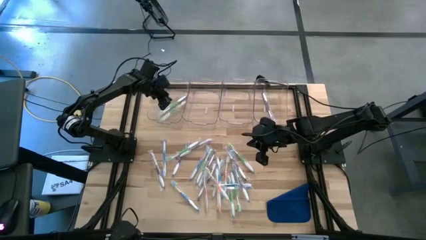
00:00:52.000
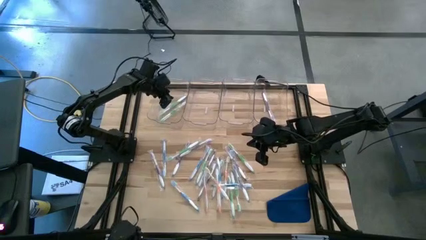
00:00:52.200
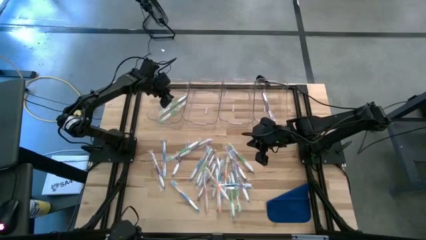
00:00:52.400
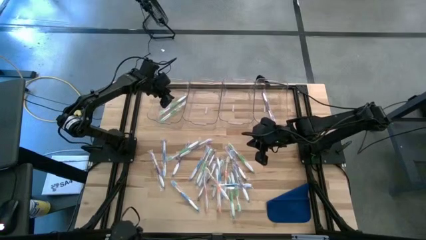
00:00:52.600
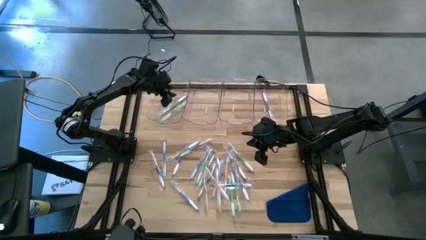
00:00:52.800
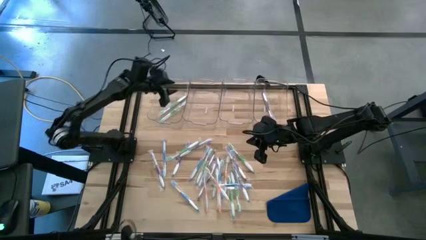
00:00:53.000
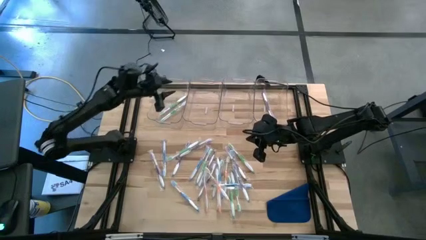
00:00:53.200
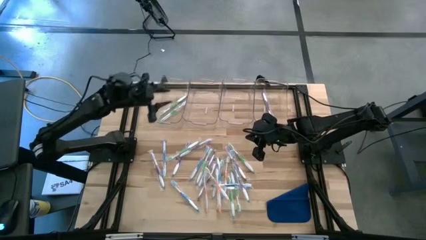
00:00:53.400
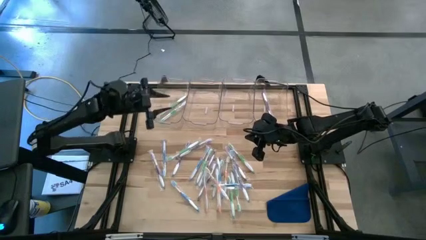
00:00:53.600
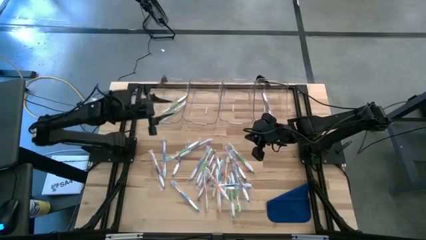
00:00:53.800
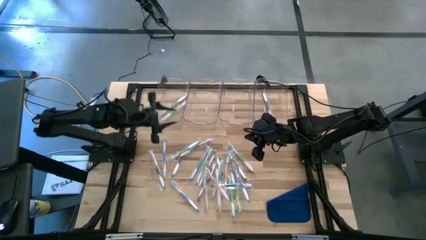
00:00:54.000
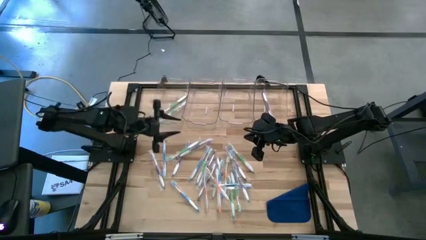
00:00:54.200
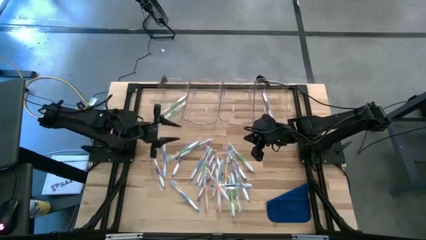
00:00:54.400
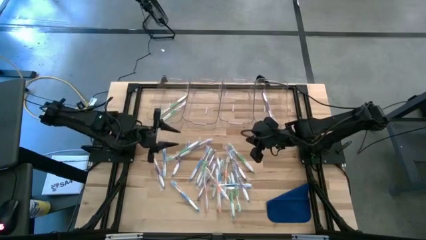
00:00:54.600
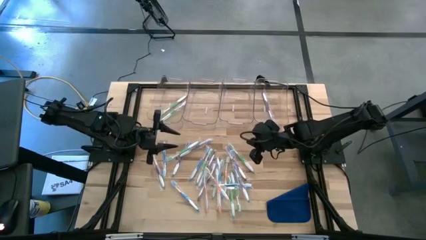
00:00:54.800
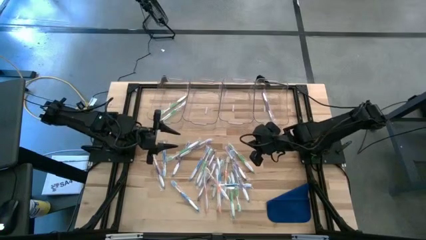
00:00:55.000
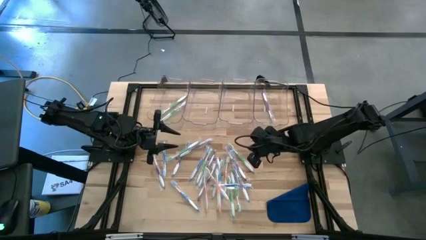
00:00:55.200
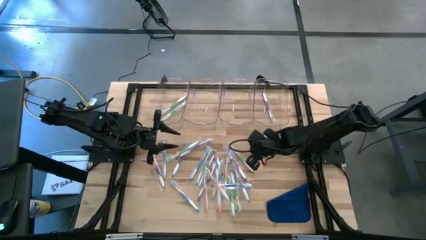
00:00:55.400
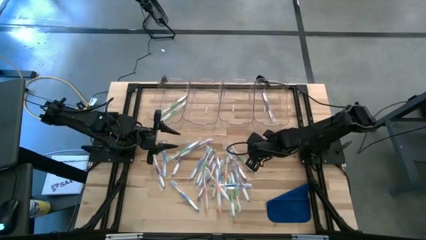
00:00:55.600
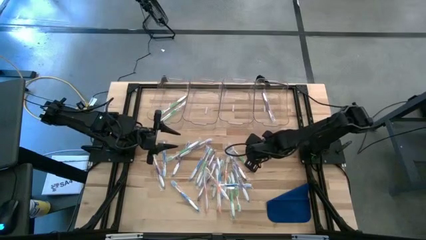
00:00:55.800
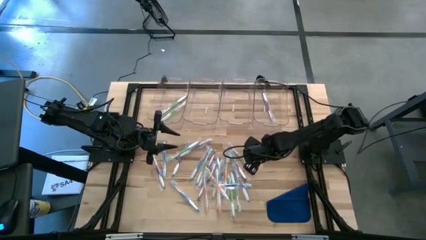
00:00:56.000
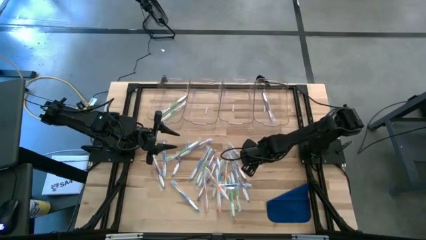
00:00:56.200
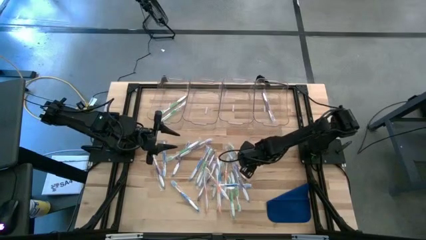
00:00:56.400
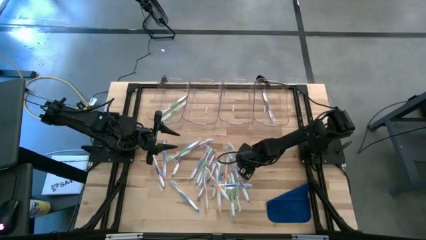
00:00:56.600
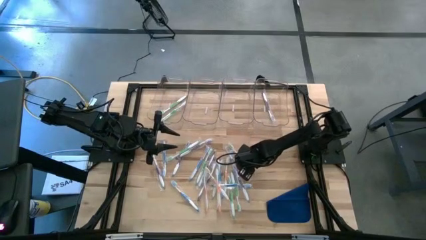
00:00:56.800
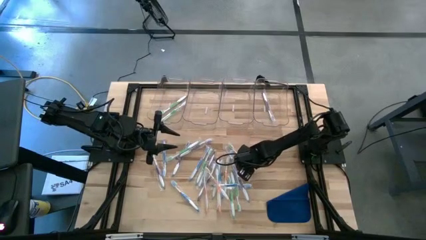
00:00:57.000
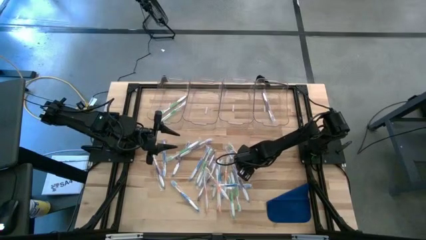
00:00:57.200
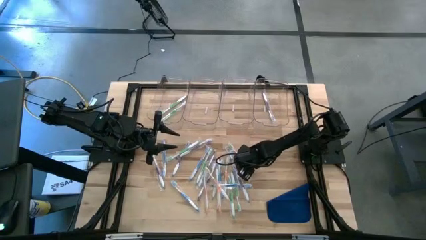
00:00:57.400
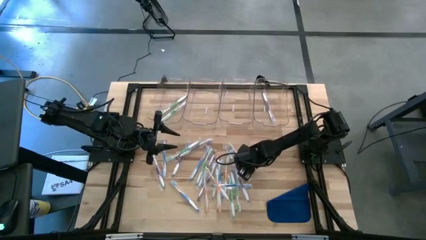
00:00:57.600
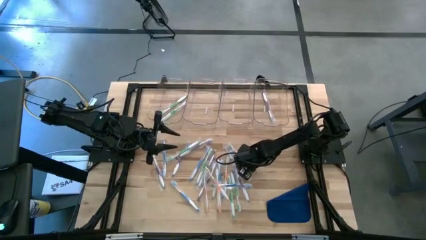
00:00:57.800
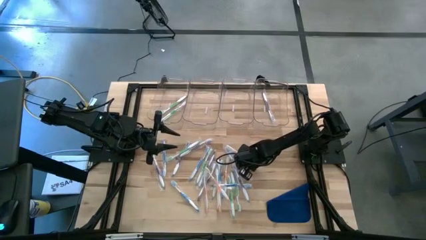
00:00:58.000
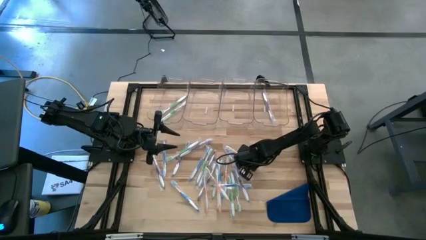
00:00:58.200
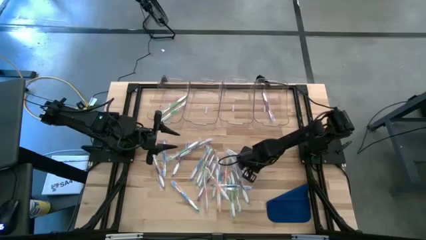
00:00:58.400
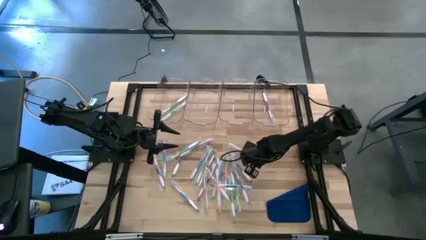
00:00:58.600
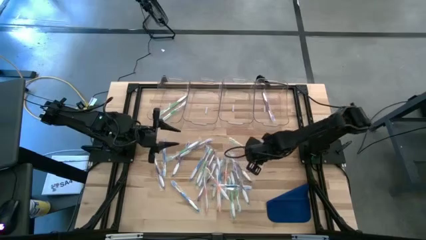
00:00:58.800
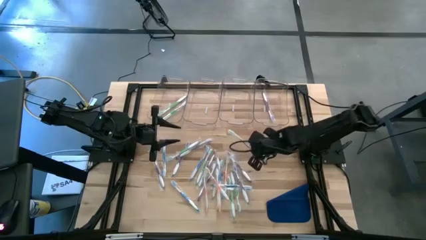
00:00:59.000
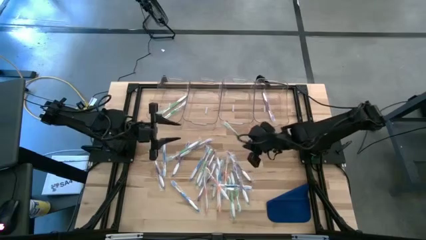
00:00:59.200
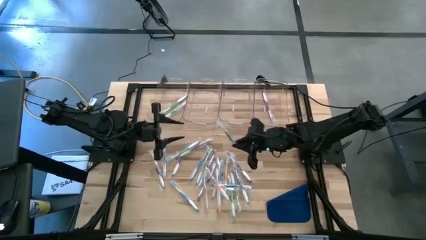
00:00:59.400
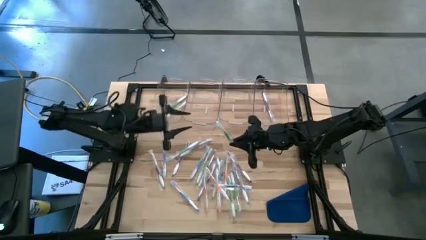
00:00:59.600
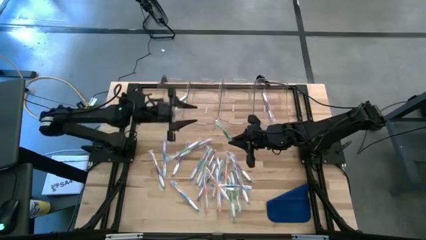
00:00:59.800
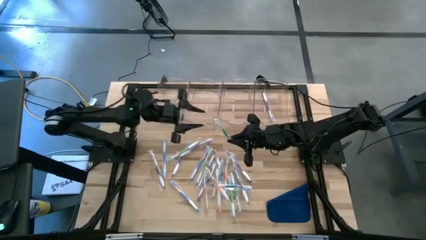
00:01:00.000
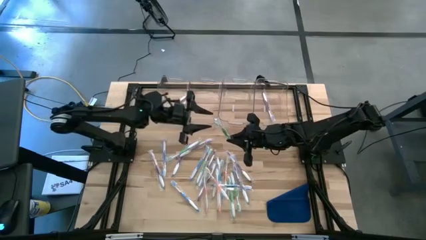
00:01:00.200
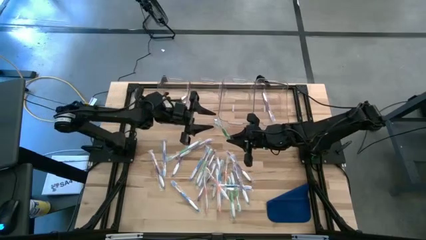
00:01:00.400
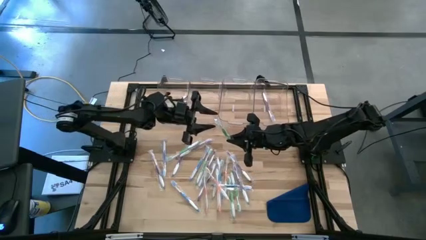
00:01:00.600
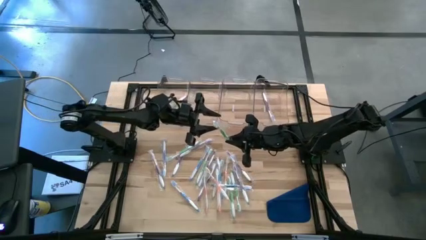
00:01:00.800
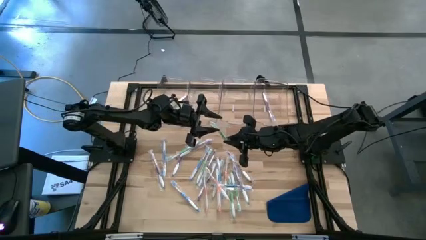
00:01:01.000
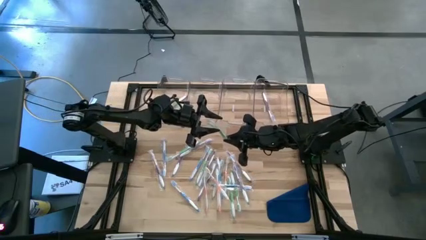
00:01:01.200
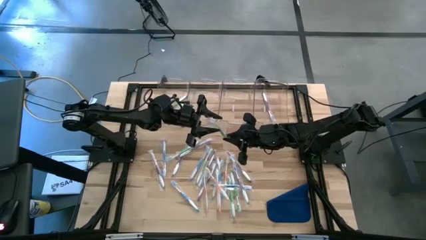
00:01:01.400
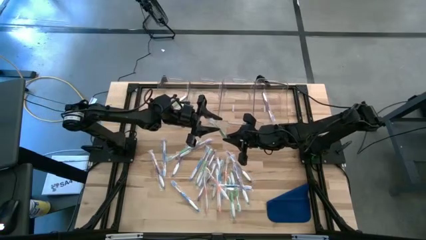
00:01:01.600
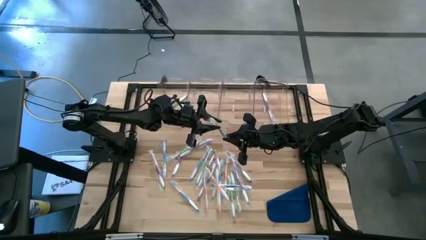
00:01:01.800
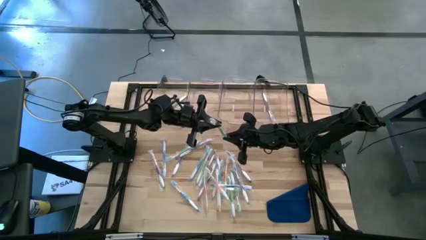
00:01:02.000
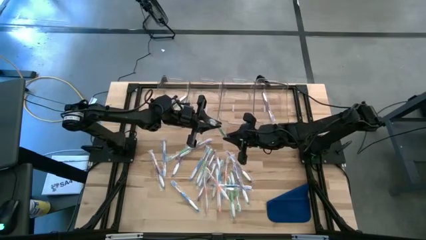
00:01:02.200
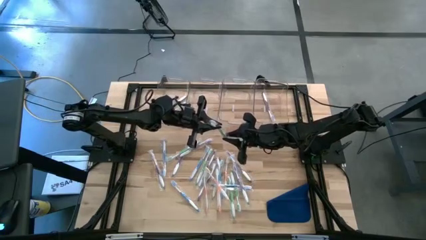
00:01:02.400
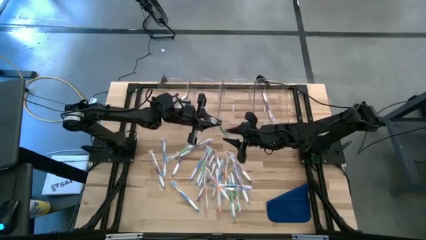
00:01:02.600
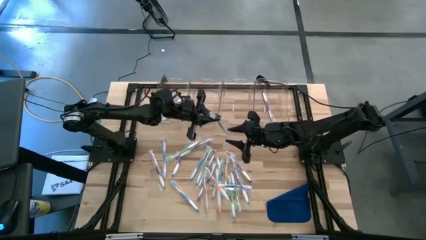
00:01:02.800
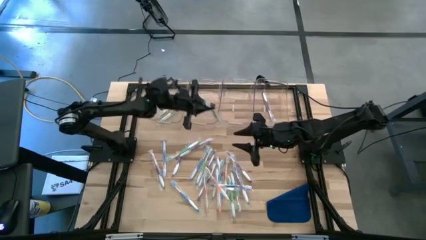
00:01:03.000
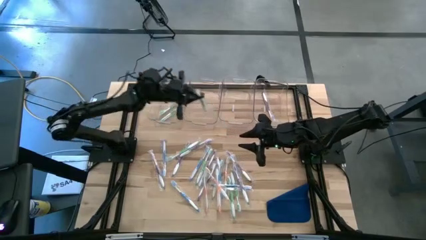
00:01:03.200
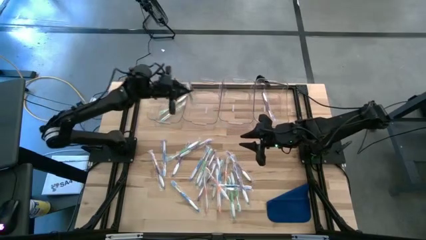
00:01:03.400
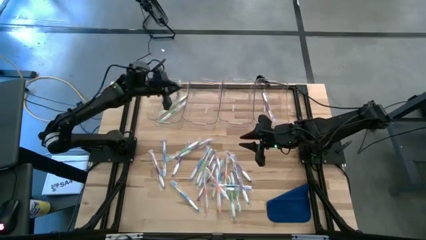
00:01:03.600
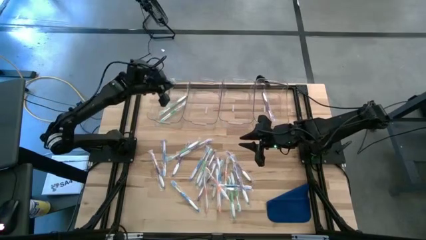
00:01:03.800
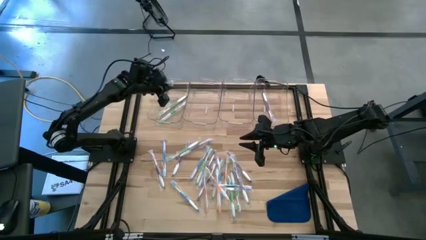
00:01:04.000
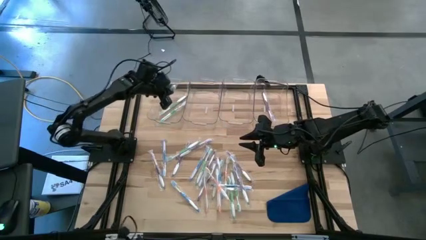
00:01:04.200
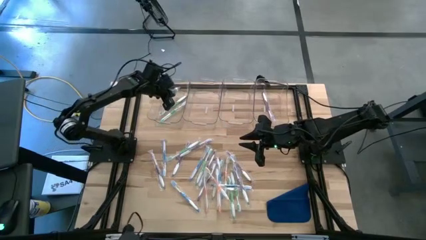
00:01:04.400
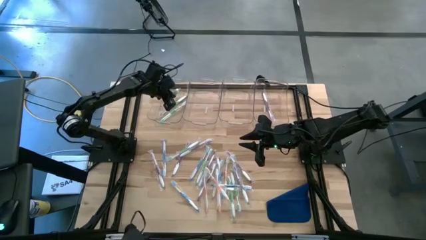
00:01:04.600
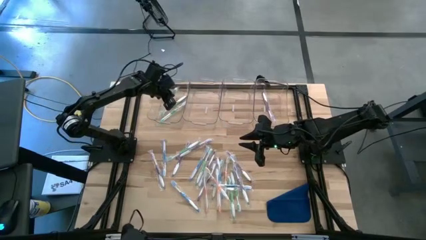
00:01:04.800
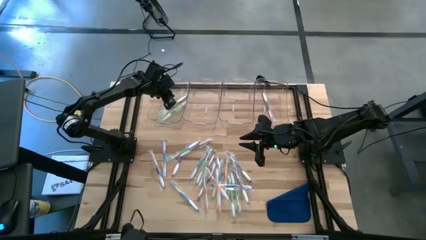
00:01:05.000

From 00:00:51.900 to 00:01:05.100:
Task: Pick & Place Toothbrushes
Put the green toothbrush into the left transparent bin

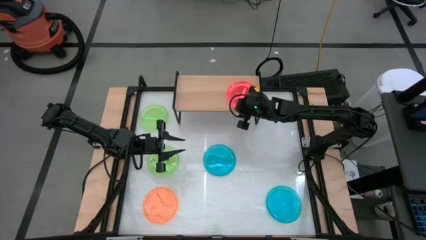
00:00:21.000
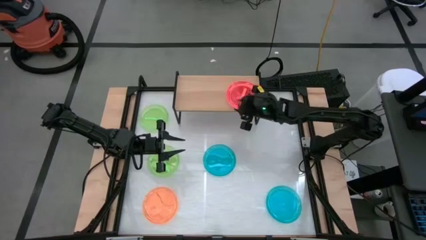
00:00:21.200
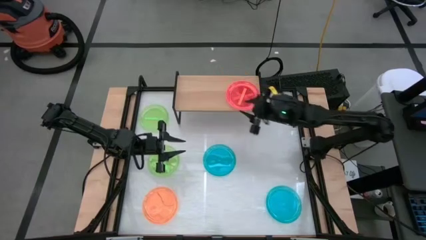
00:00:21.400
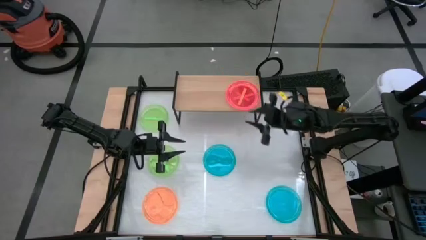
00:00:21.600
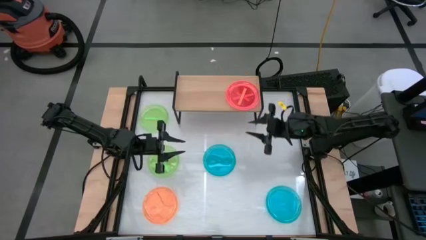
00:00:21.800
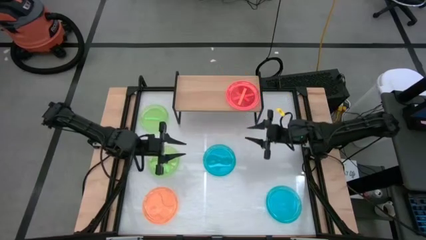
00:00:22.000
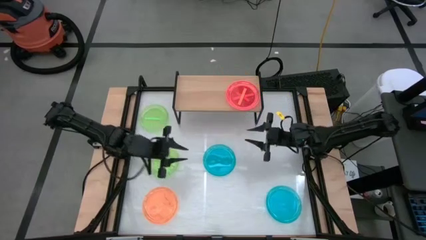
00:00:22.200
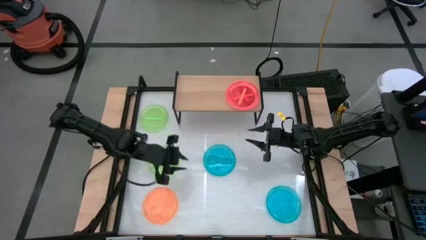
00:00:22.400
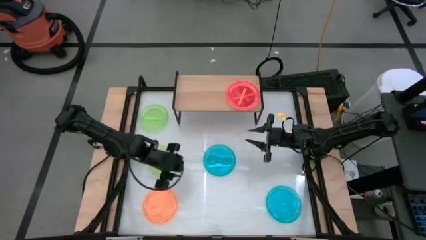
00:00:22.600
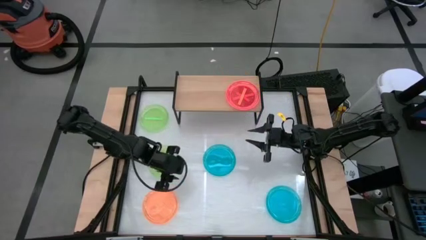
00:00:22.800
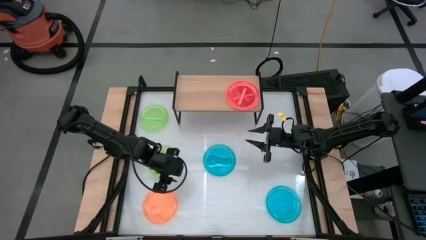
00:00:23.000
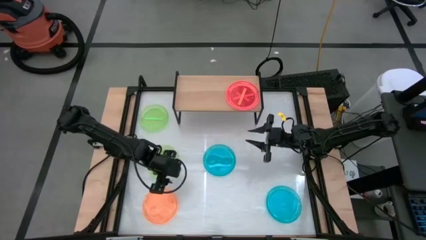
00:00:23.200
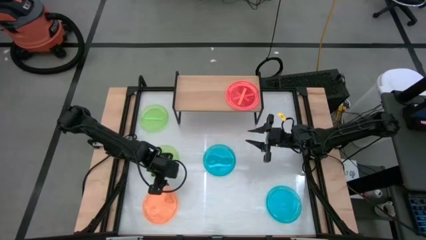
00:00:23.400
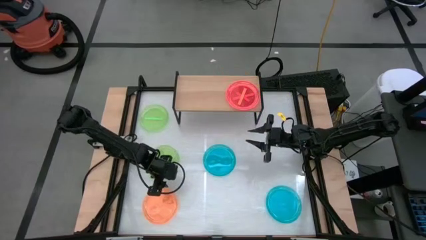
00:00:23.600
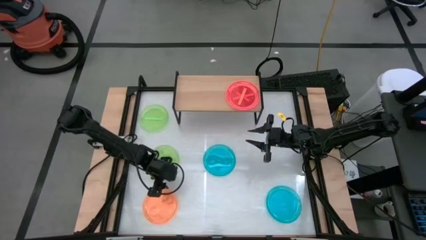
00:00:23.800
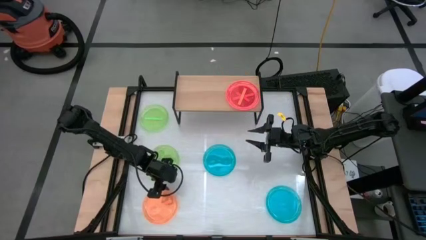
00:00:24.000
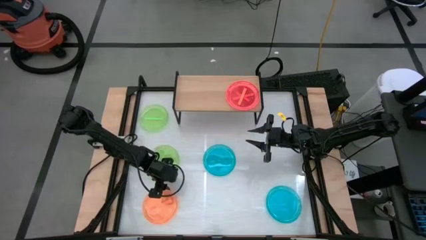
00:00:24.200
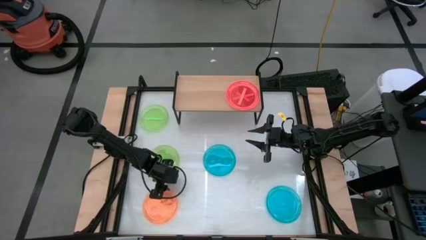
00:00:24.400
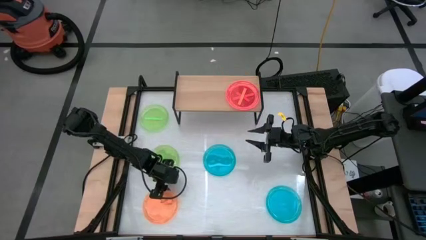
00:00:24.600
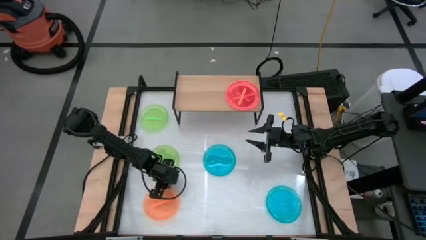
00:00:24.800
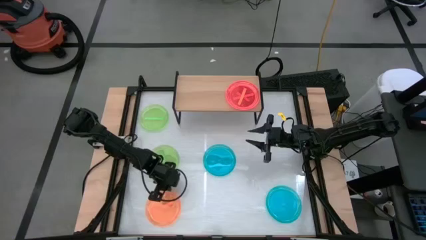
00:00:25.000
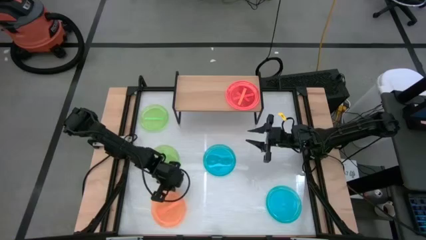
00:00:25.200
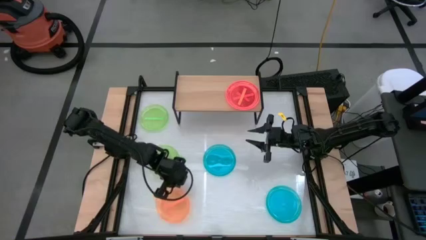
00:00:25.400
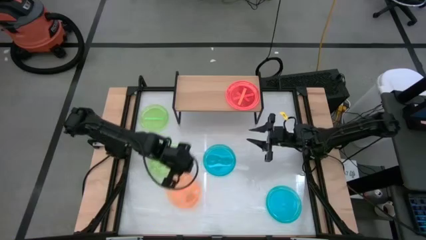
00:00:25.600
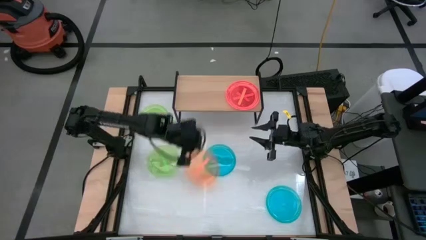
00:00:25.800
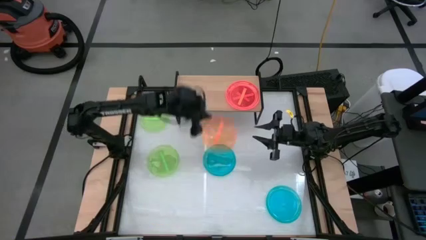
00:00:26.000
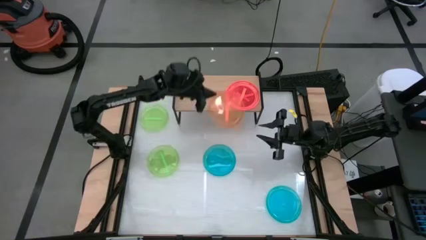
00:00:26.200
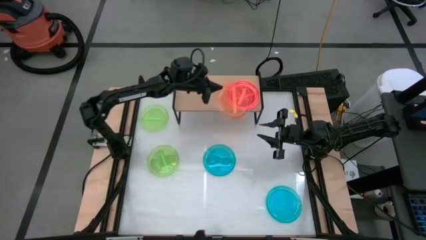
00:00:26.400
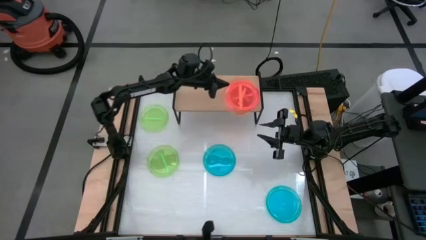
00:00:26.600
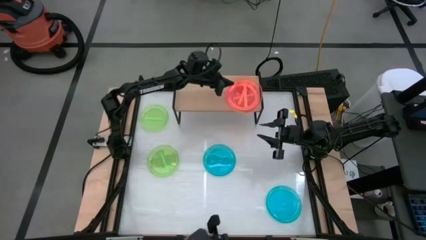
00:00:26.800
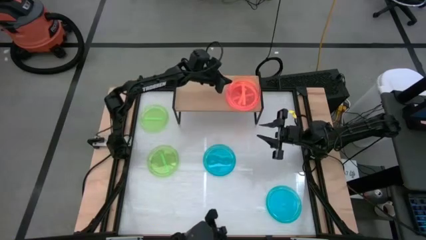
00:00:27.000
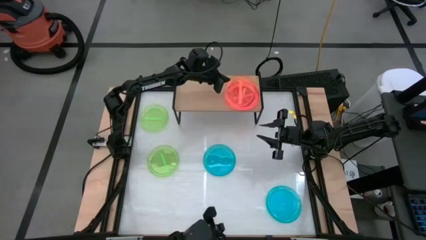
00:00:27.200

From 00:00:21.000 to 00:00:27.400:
Task: Place and stack plates onto a shelf
Stack the orange plate on top of the orange plate on the shelf
